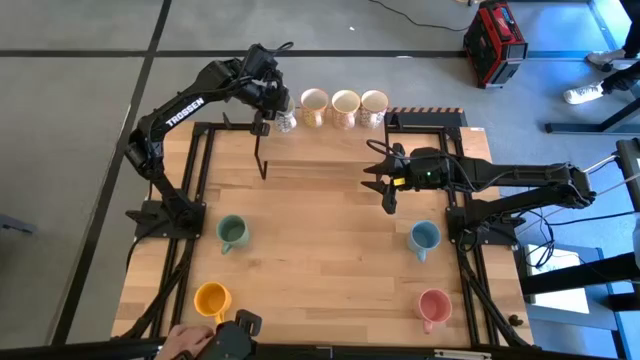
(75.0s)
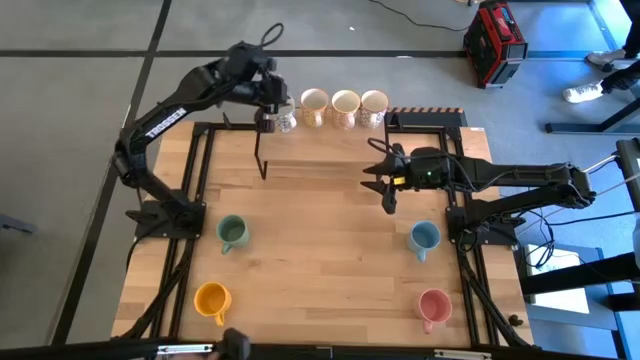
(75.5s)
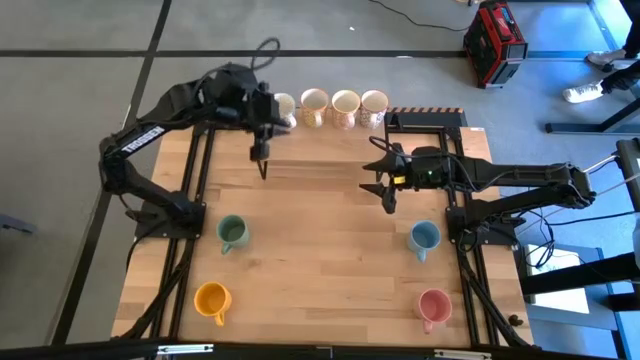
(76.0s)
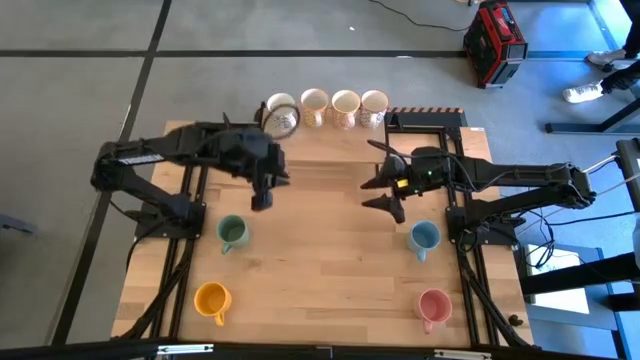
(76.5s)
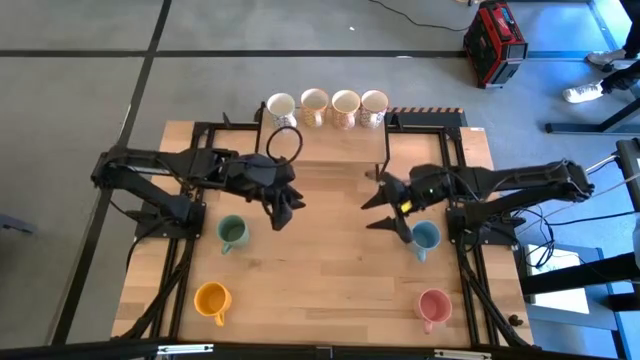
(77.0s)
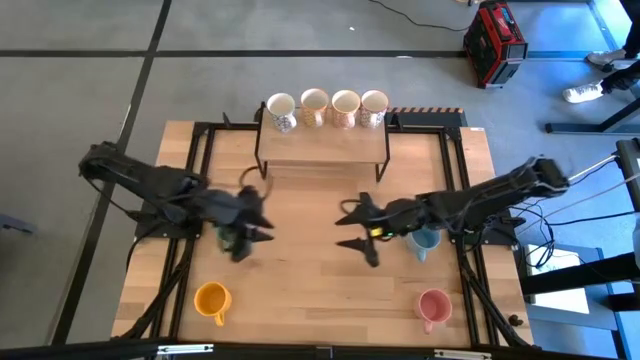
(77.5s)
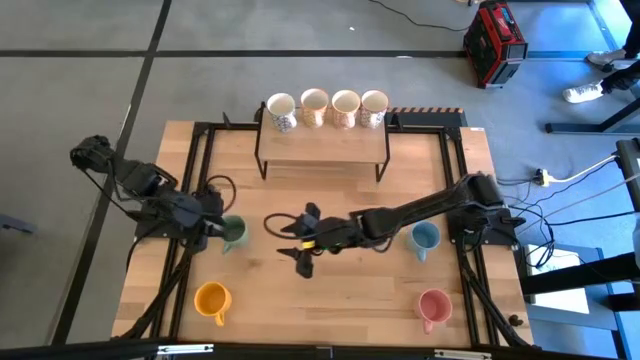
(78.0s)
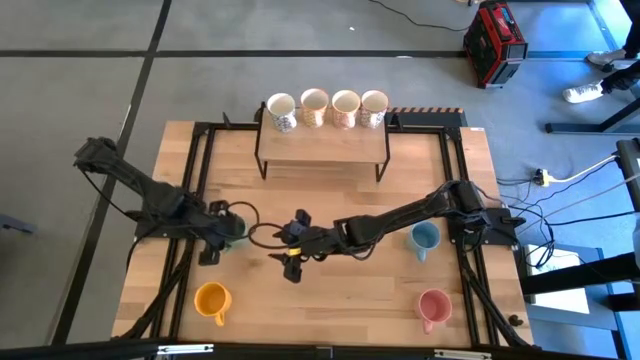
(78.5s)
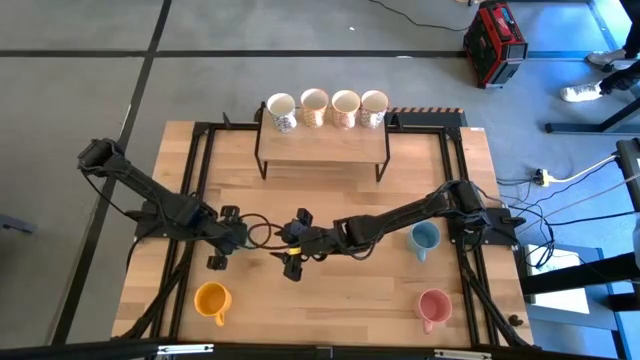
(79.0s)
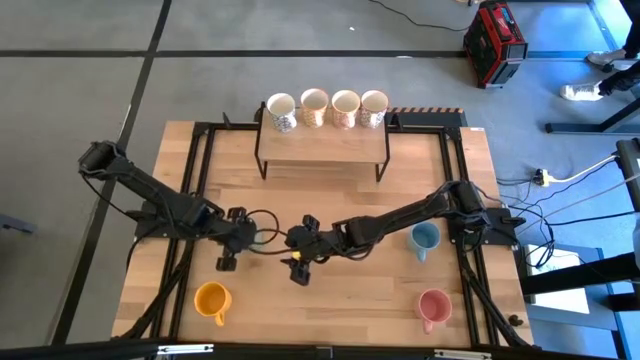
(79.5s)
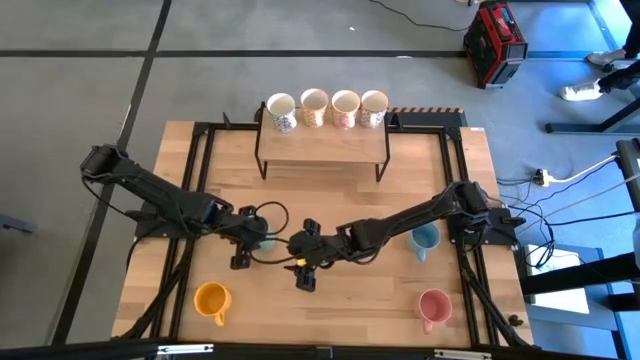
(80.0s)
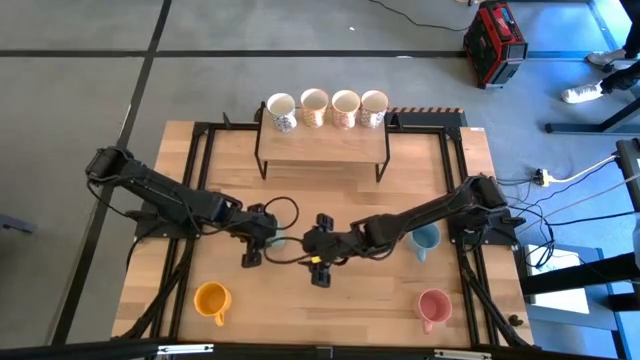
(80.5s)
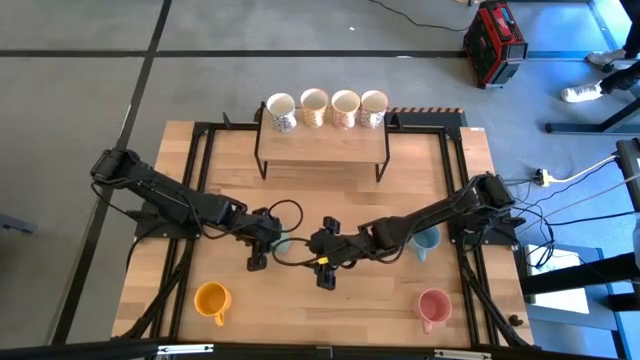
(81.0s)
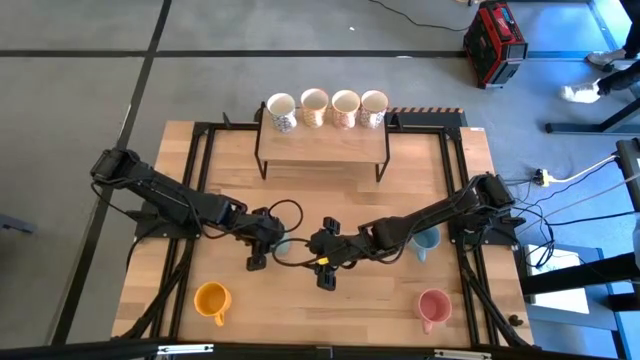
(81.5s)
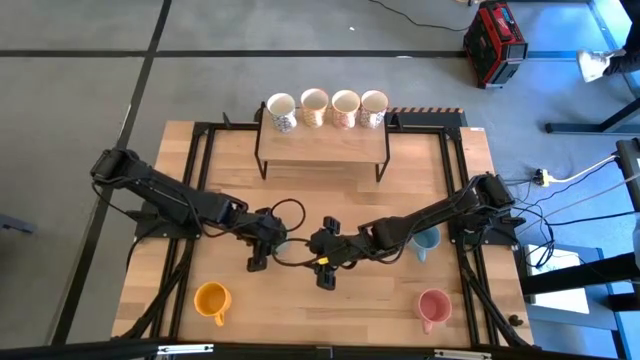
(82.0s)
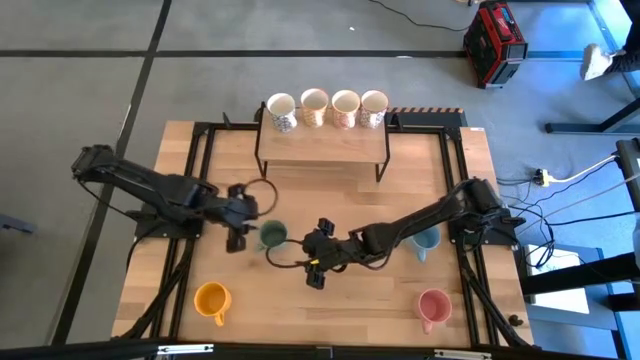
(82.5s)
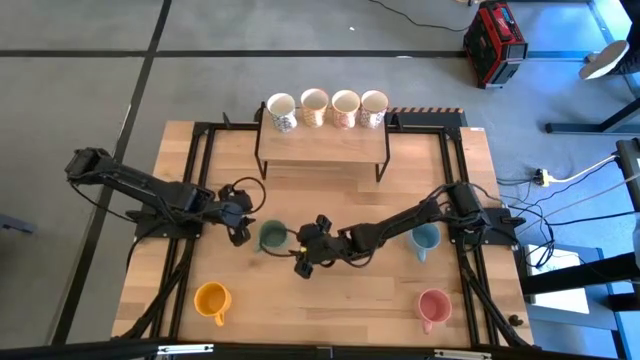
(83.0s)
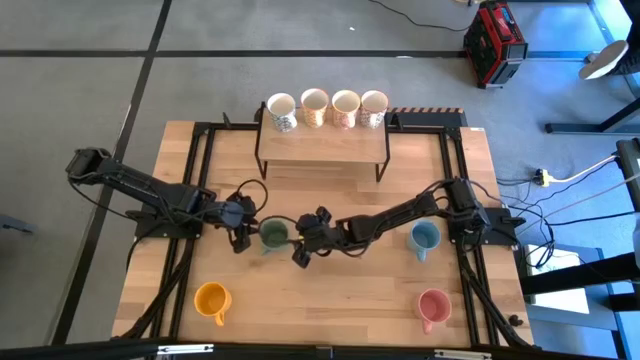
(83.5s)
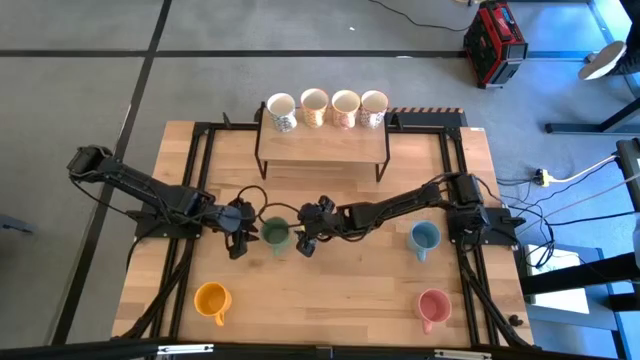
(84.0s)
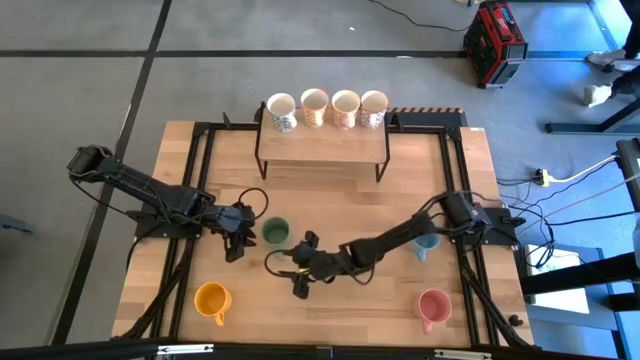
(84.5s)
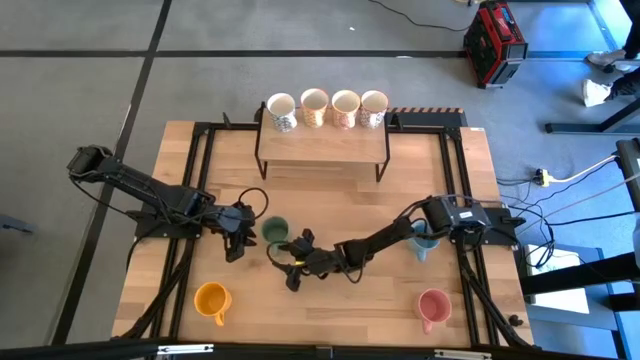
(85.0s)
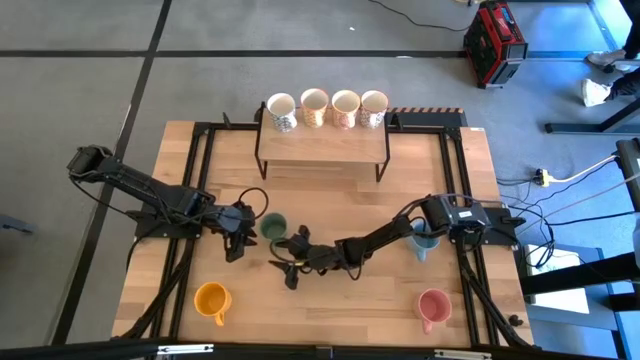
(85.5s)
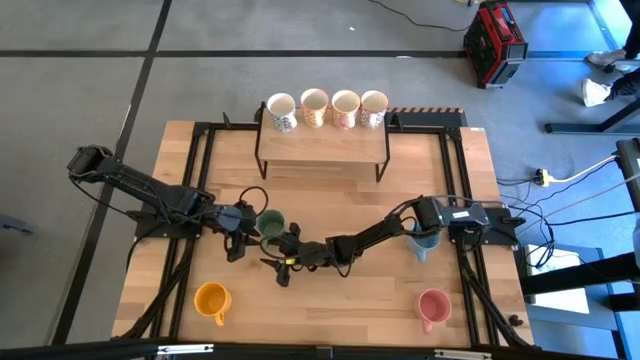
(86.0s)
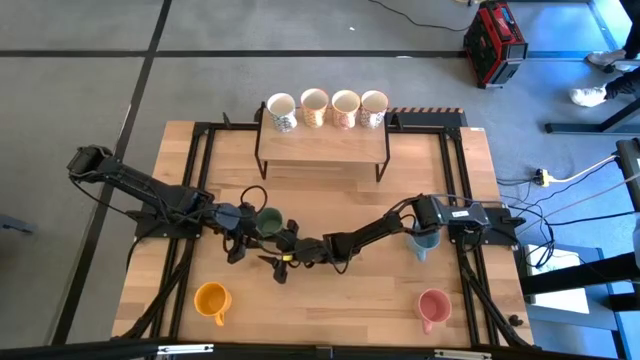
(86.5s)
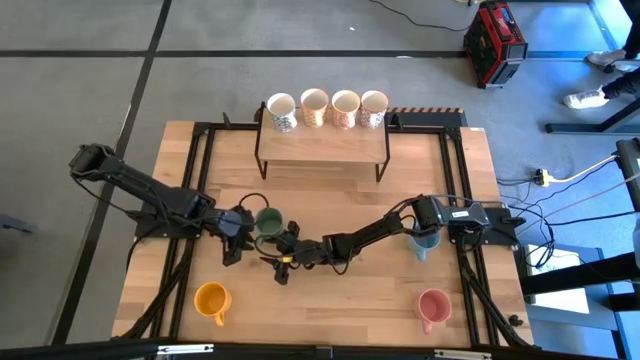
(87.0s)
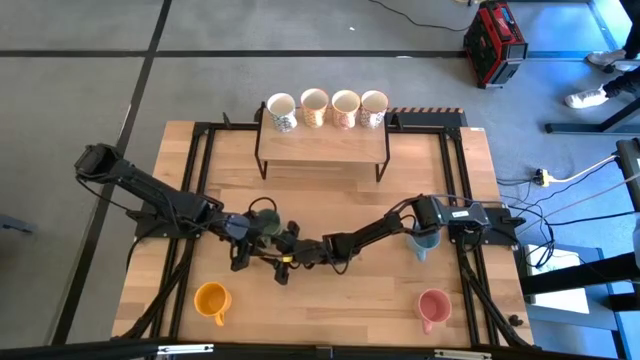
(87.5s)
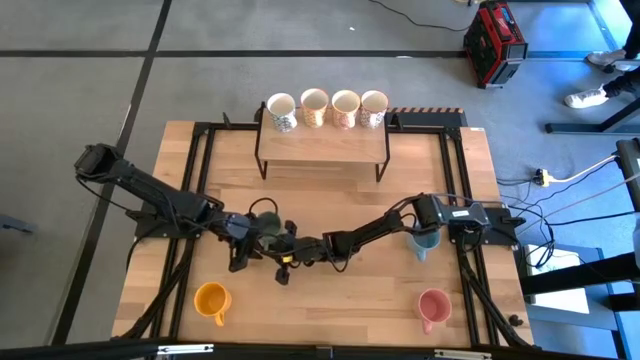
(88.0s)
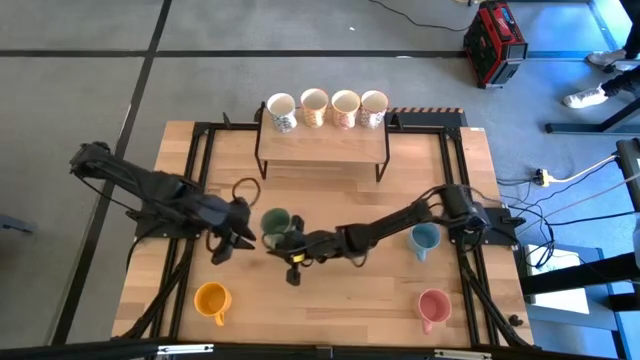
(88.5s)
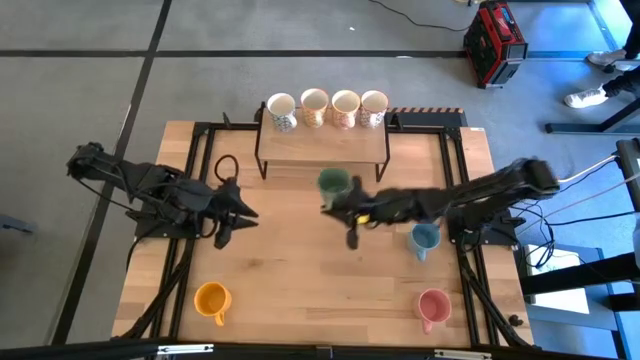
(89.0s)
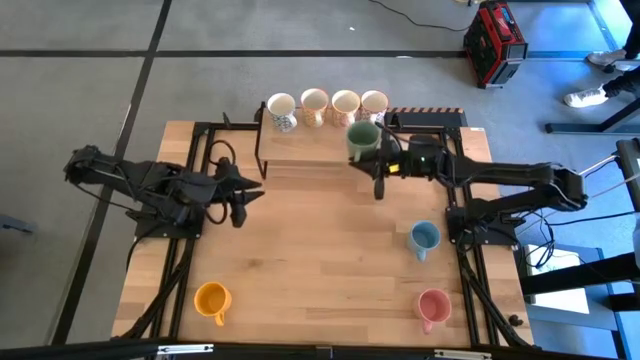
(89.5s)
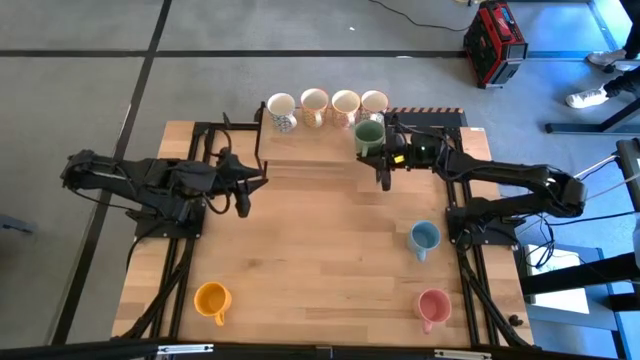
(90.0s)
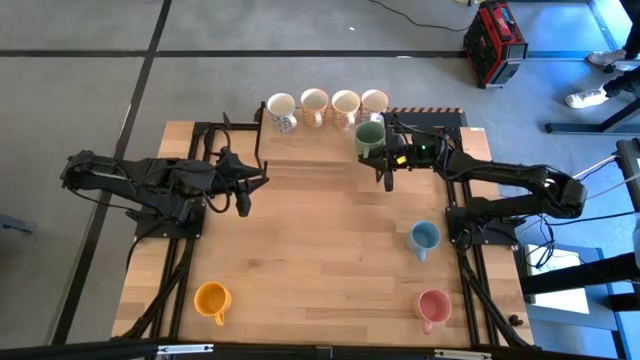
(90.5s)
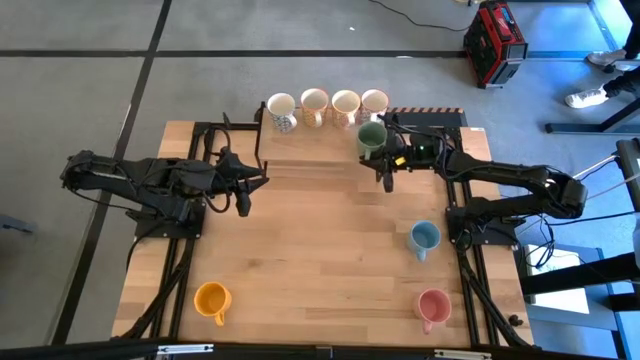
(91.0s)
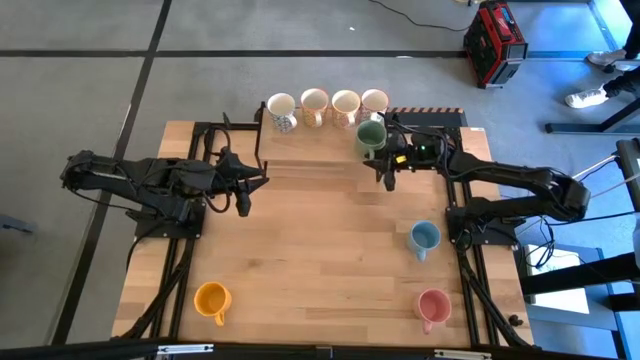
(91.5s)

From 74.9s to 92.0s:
Task: Place coffee mugs
Put the green mug on the shelf

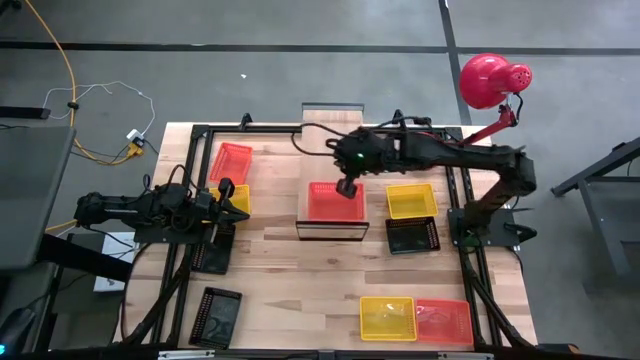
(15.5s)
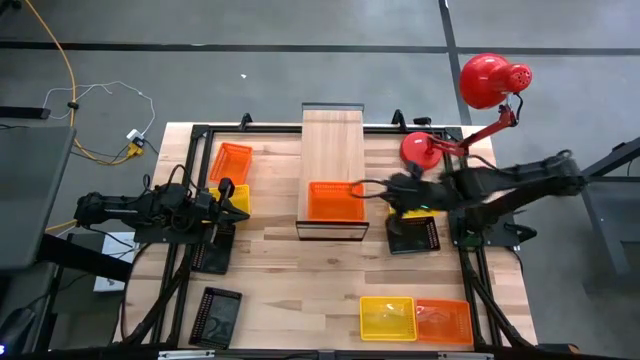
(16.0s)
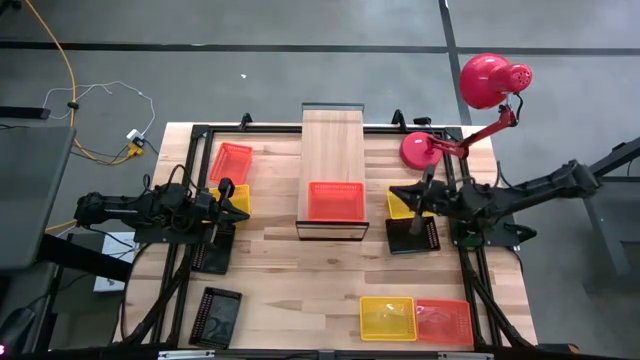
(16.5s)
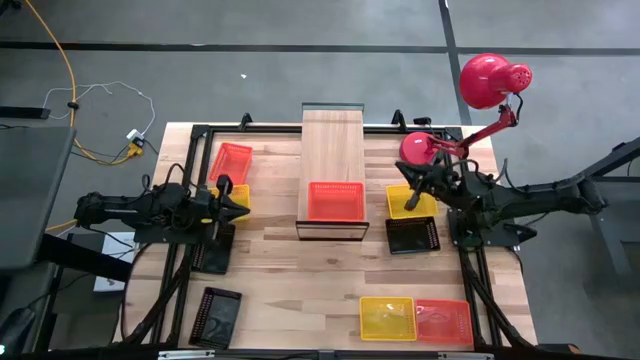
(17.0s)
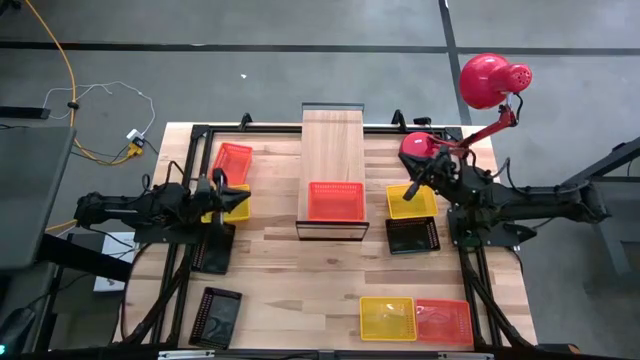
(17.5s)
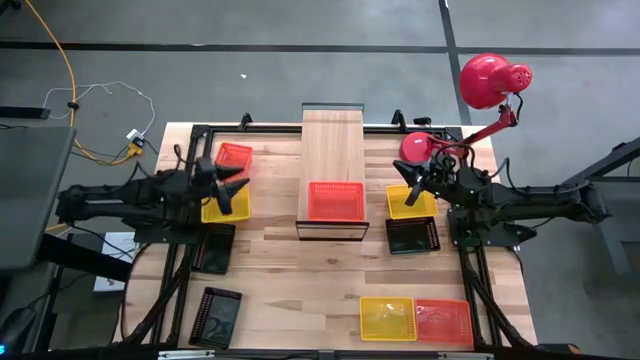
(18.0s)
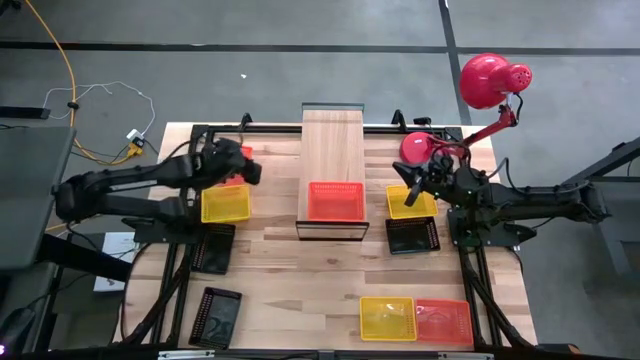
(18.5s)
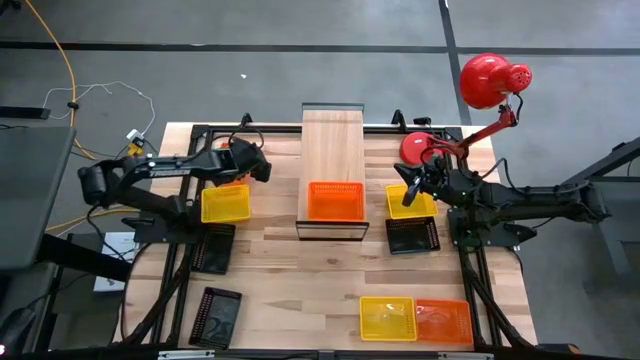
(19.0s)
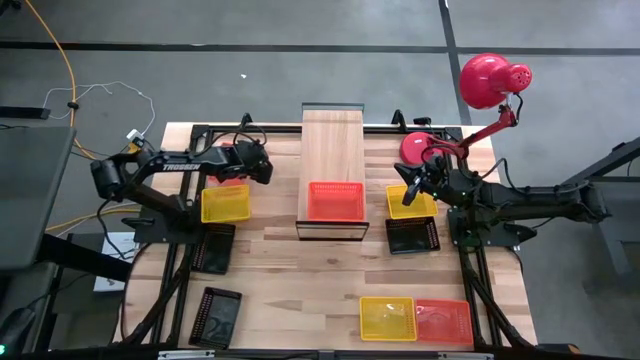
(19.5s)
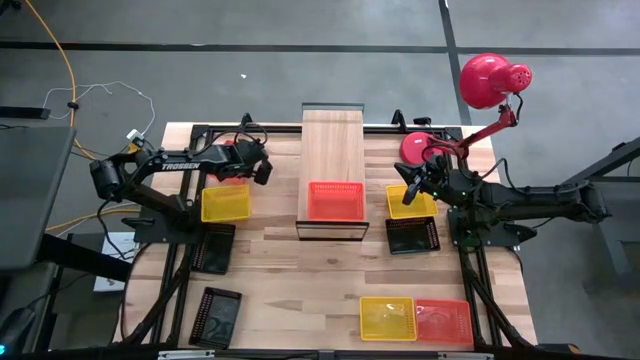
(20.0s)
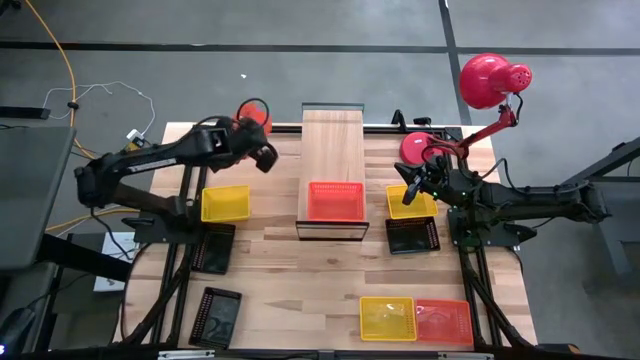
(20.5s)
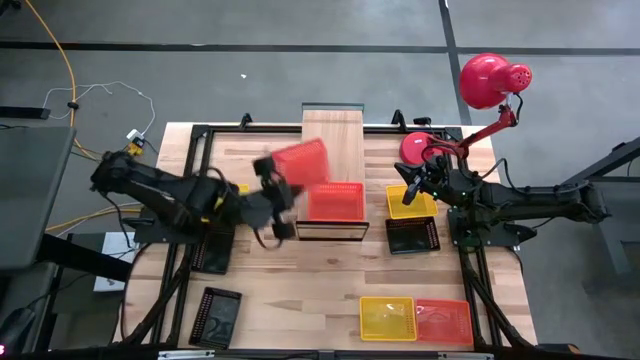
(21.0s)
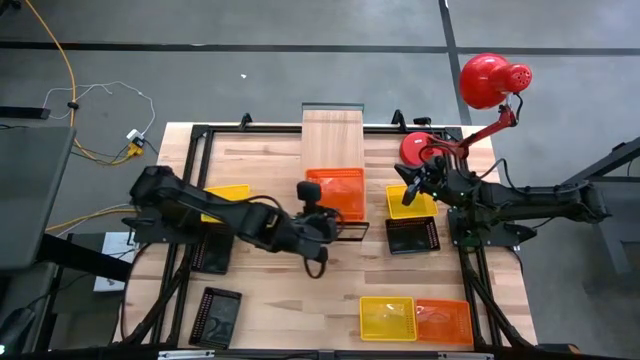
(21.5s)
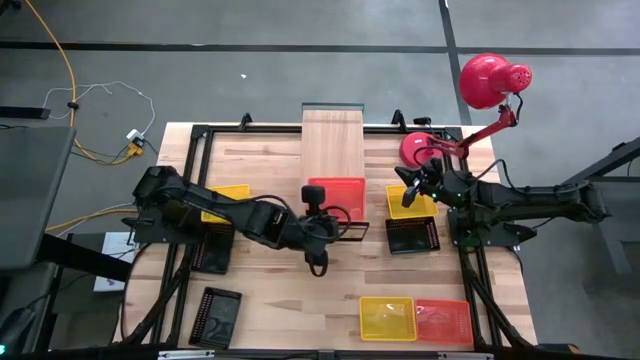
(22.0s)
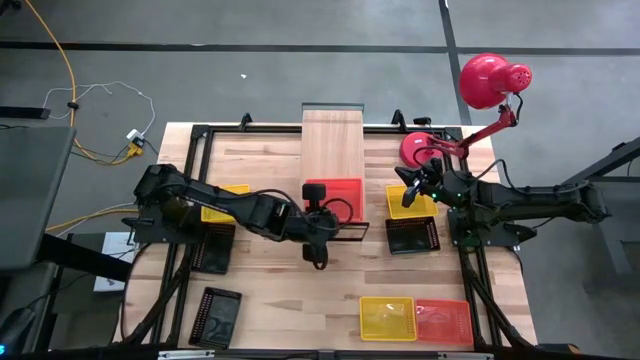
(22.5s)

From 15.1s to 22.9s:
Task: Stack baskets on shelf by color
Stack the top orange bin on the orange bin on the shelf
